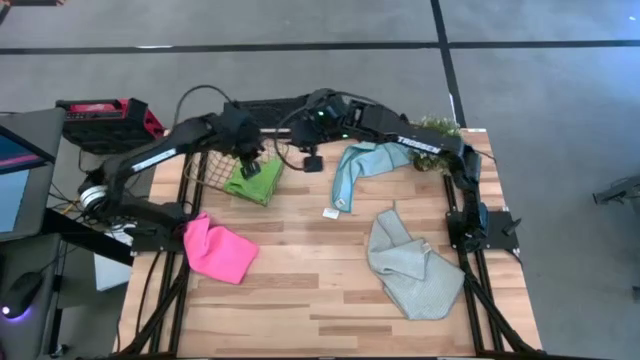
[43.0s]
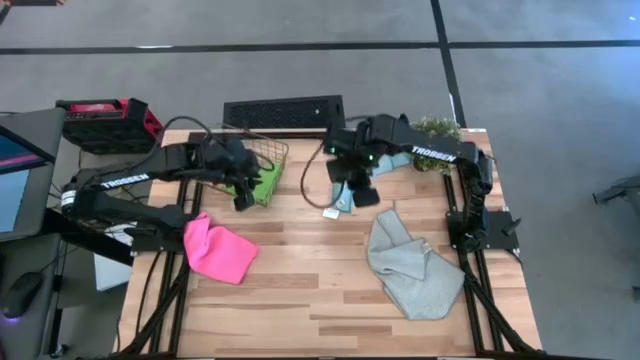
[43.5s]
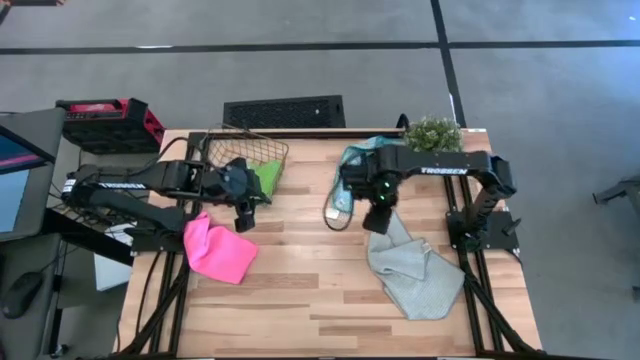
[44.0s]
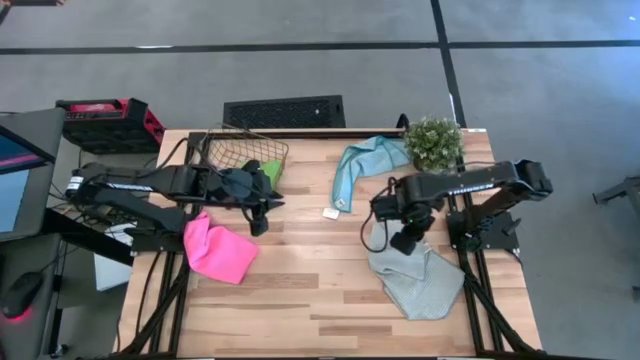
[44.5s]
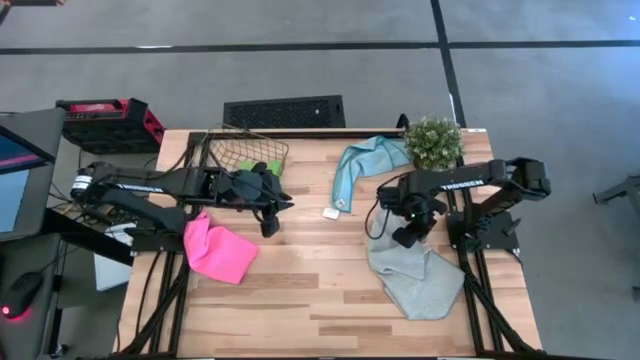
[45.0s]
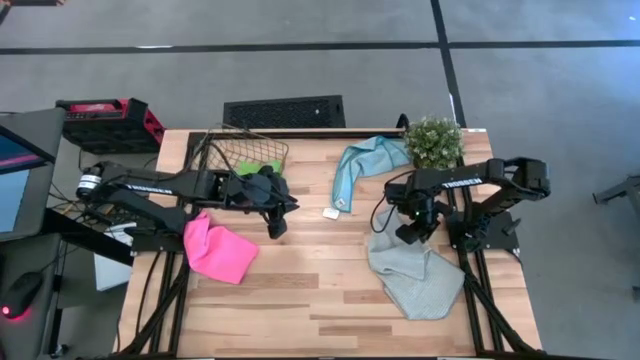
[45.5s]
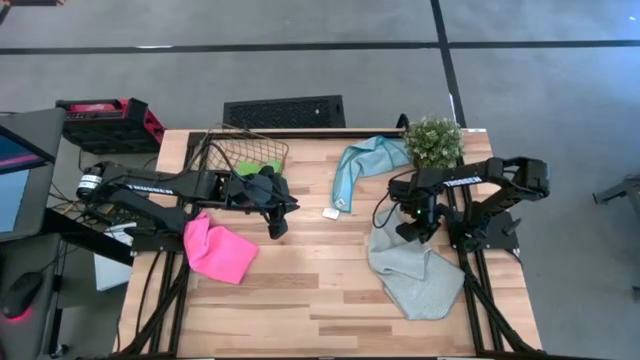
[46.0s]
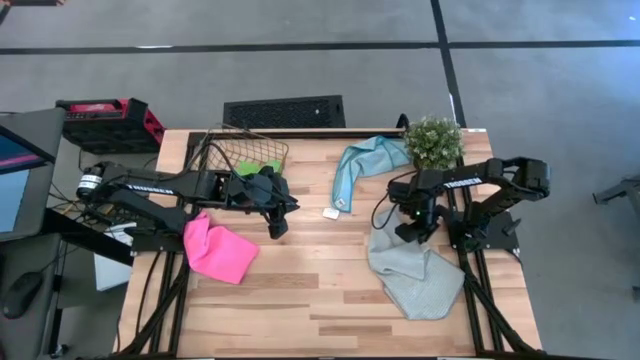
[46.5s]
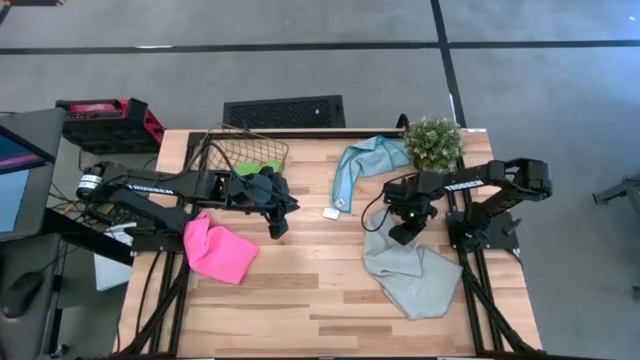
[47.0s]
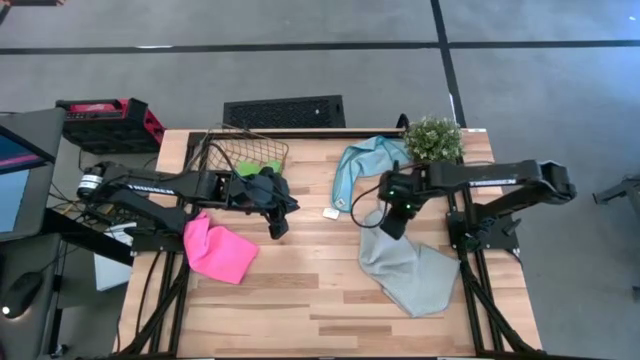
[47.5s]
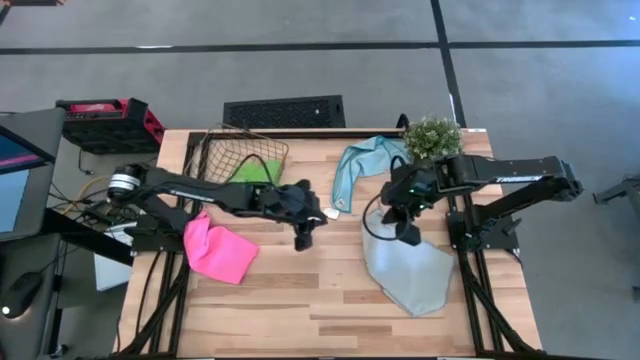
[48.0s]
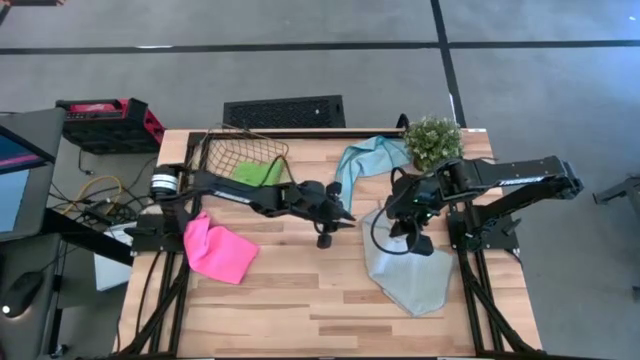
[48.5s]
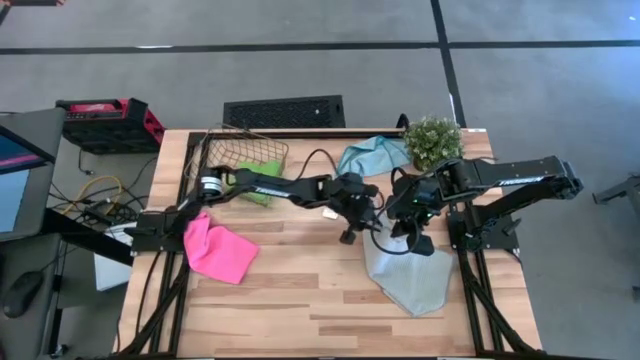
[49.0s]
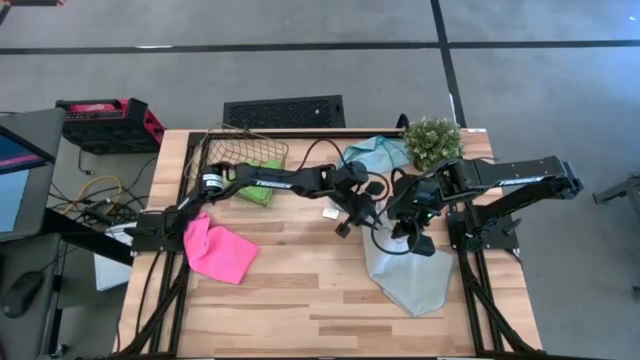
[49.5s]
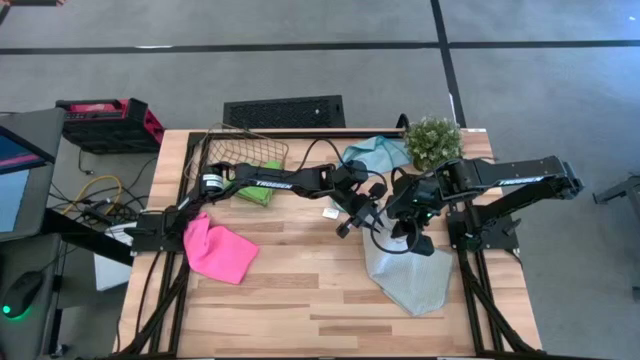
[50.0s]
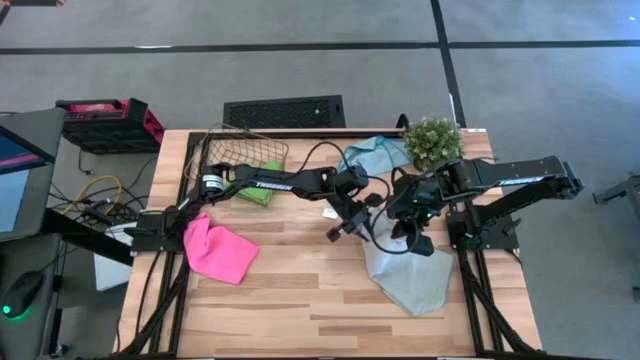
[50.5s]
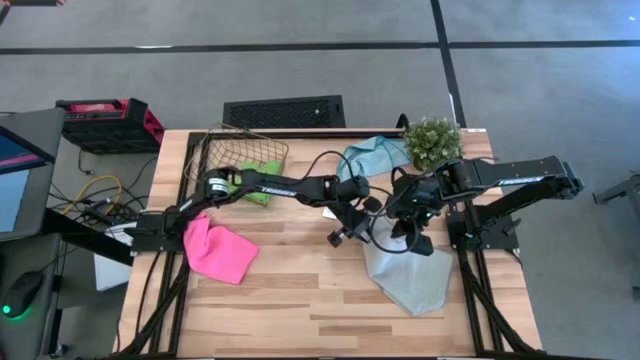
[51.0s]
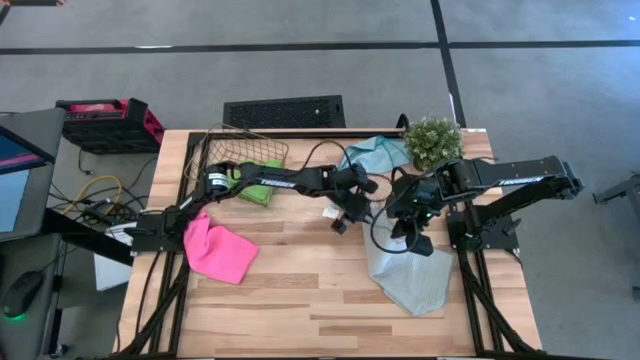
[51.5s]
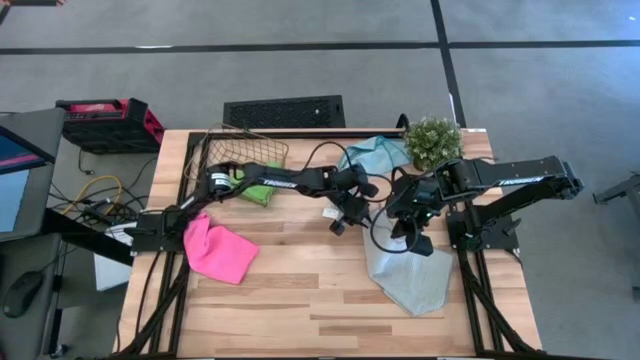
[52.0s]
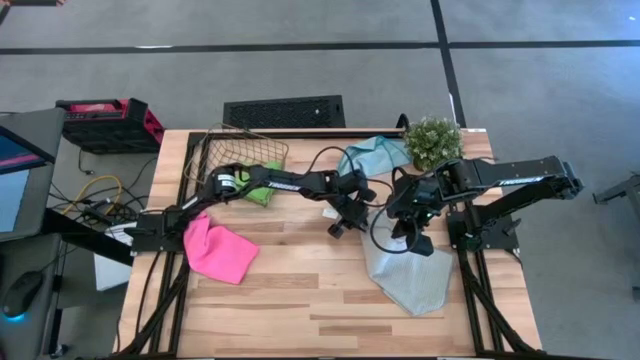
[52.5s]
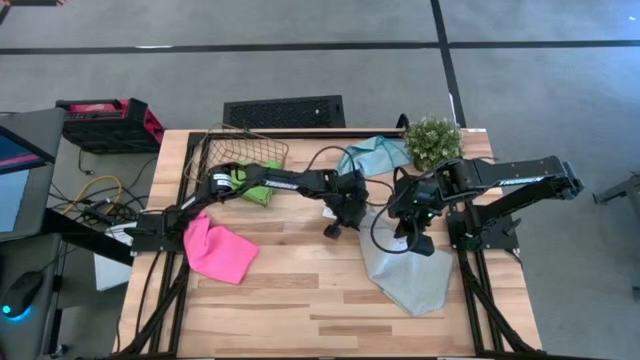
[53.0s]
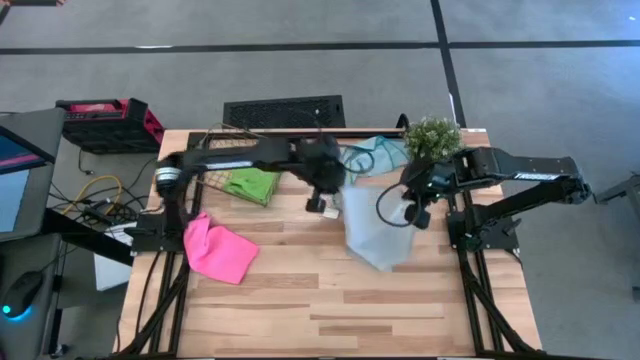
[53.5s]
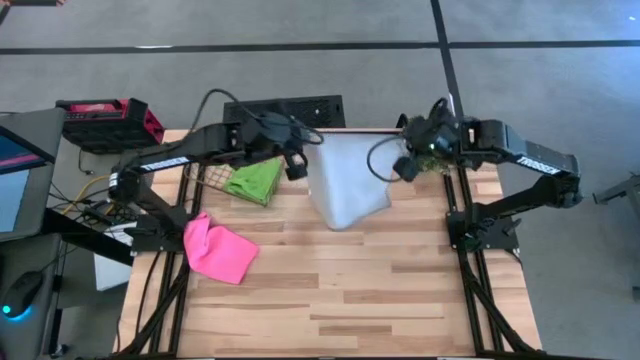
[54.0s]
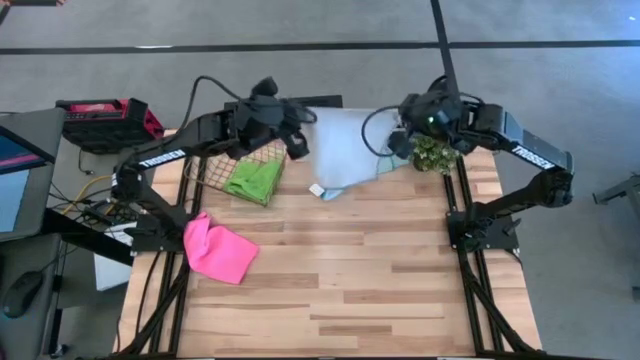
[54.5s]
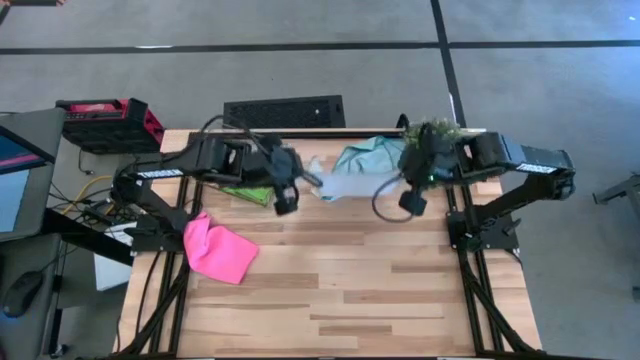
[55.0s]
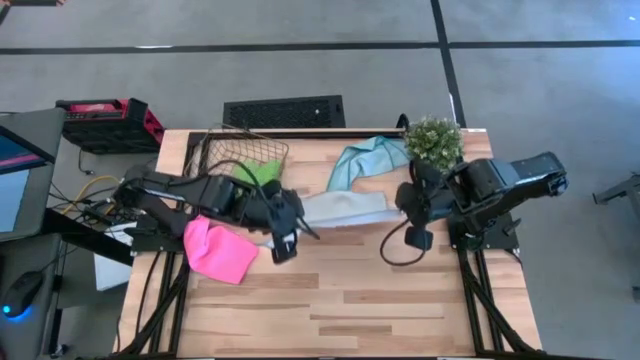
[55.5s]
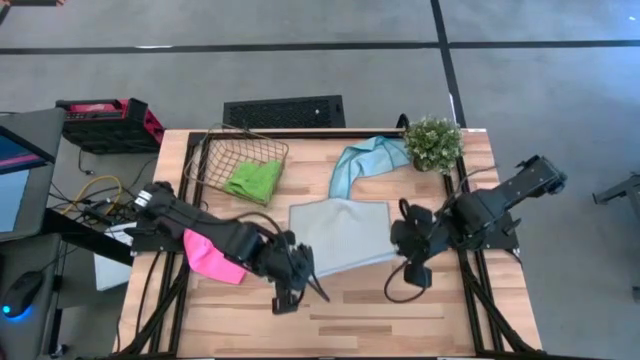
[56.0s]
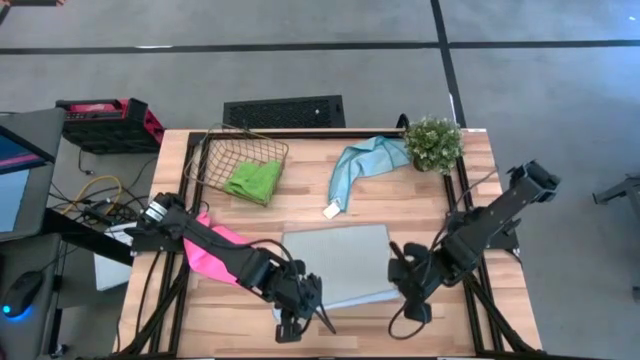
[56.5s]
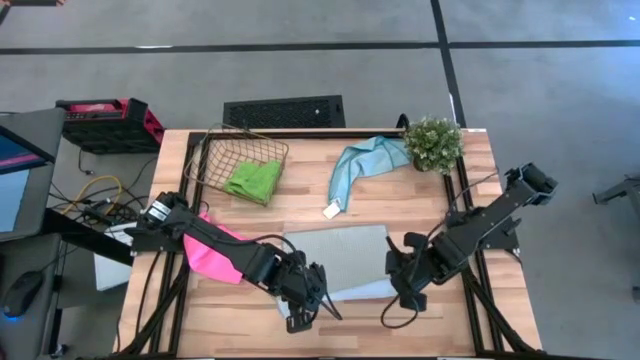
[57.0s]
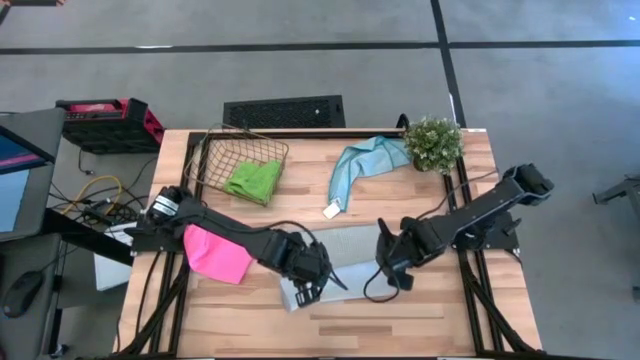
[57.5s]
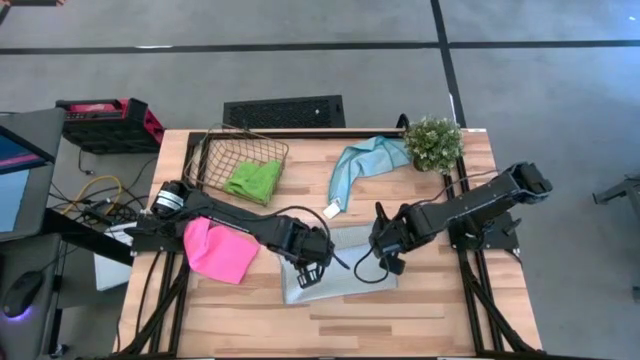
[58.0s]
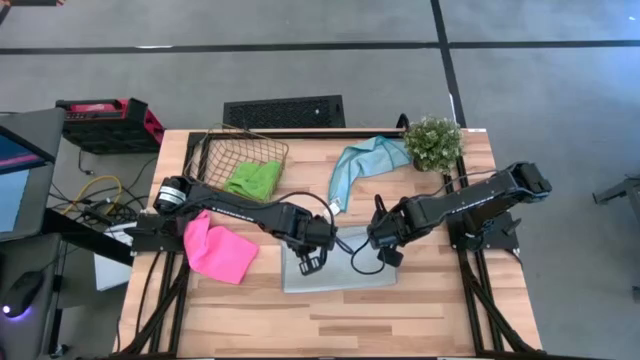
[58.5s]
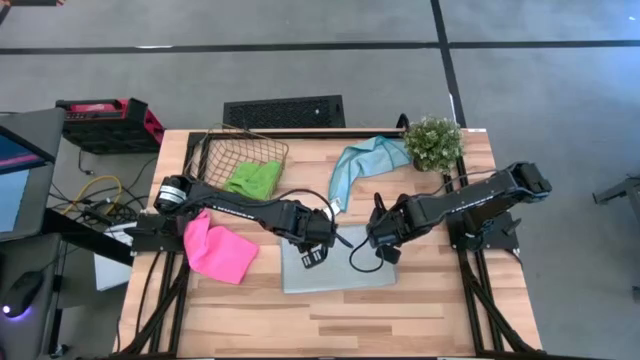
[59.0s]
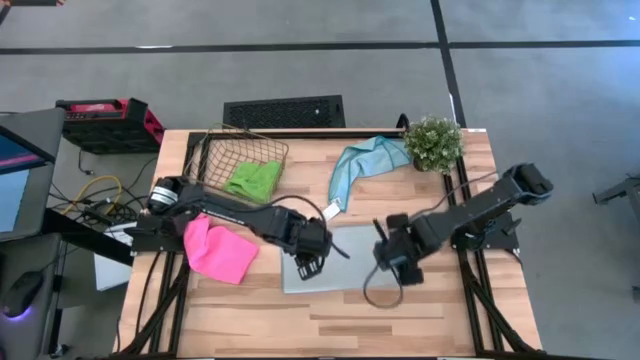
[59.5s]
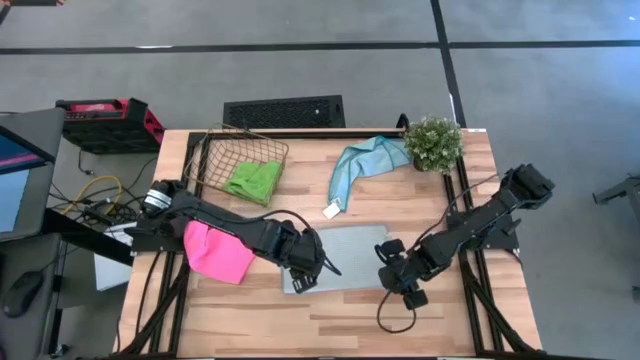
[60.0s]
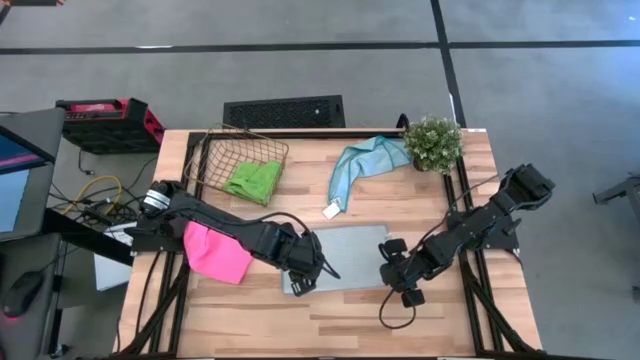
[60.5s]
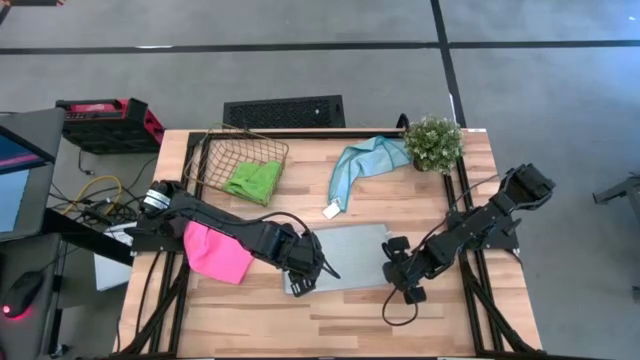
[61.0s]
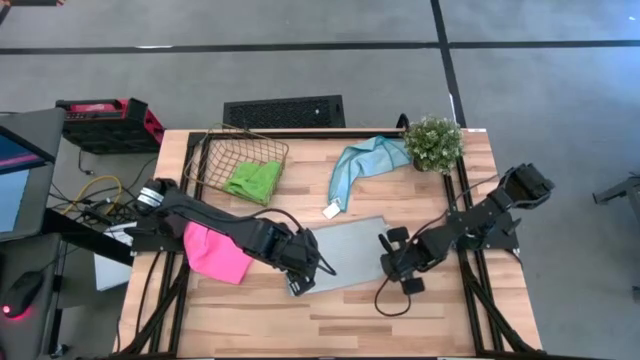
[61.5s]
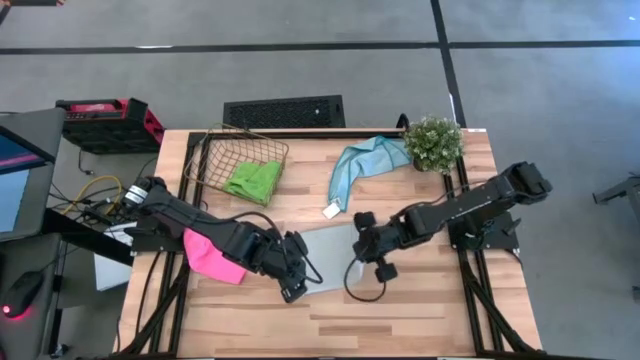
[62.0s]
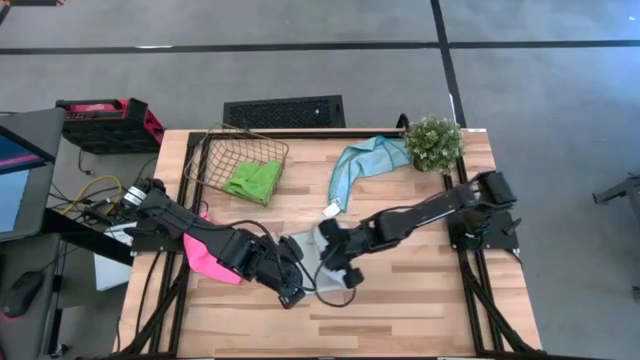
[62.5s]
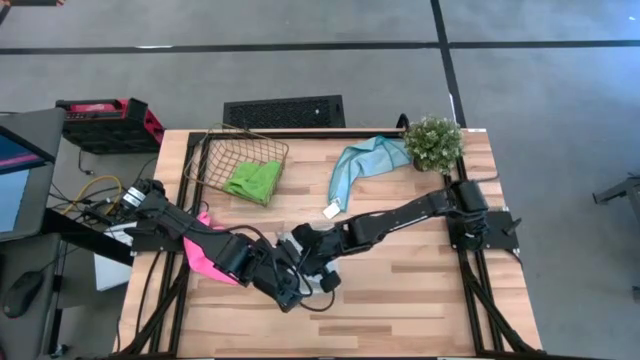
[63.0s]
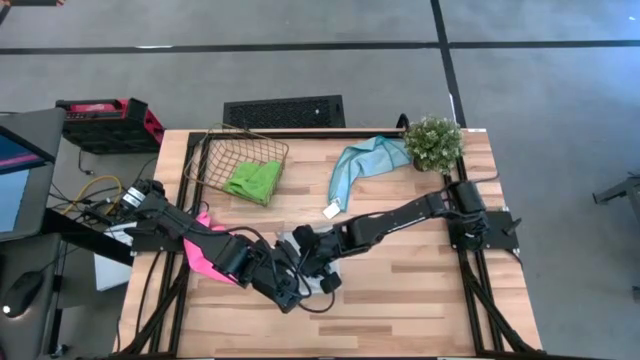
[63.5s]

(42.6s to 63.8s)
Task: Fold microfiber towels
Fold the gray microfiber cloth

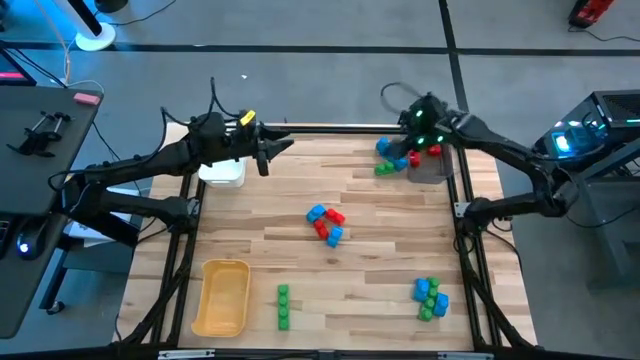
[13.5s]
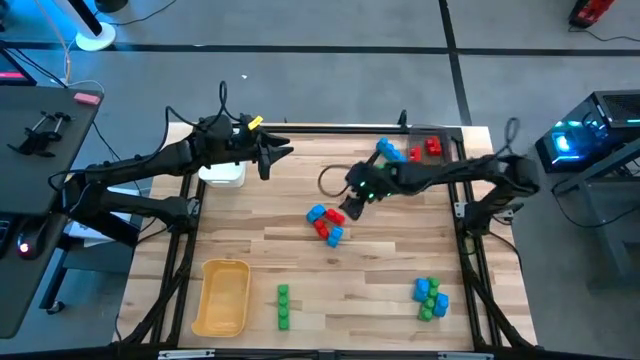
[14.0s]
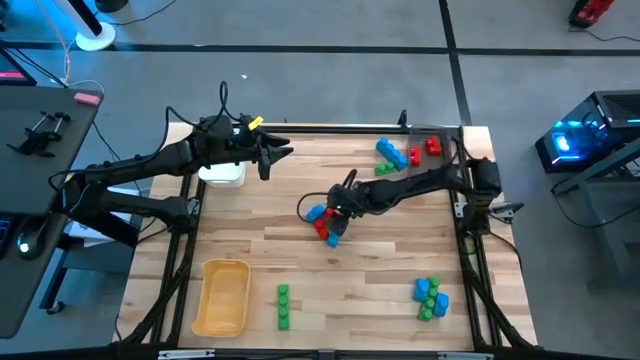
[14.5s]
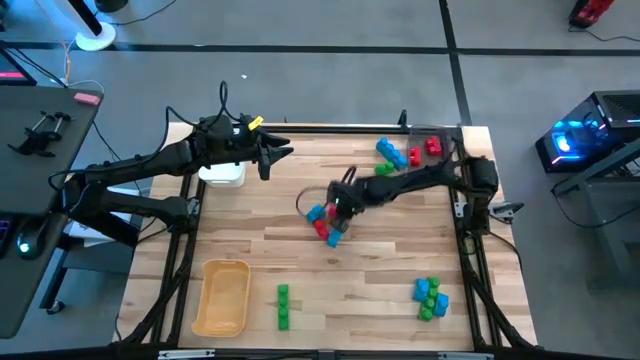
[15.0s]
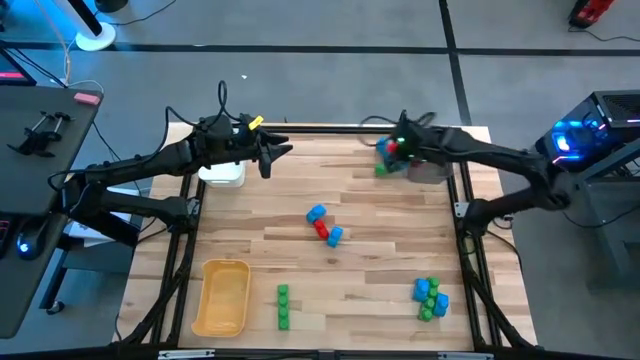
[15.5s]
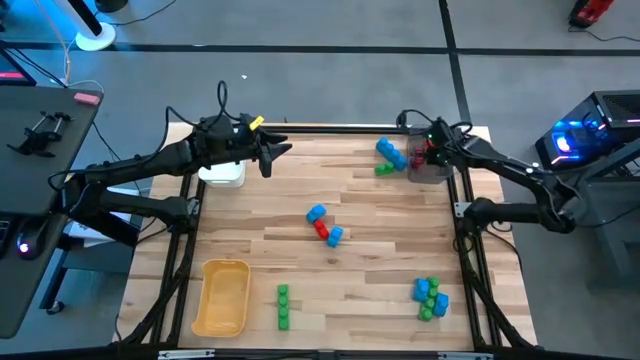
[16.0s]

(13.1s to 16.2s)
Task: Sort blocks
Put the top game piece into the black bin
